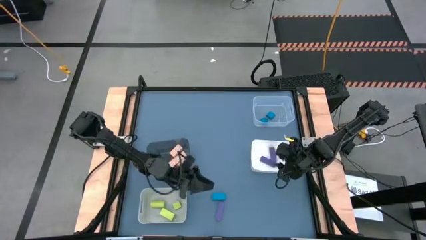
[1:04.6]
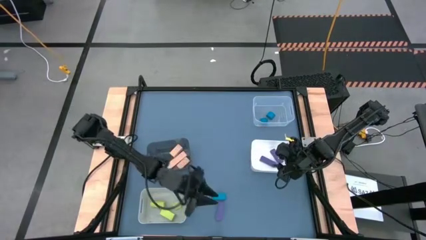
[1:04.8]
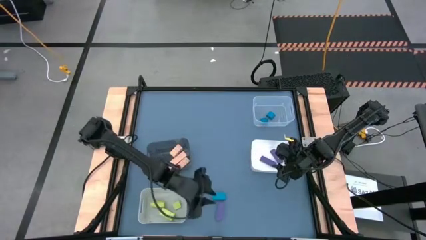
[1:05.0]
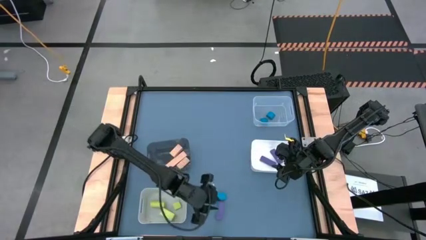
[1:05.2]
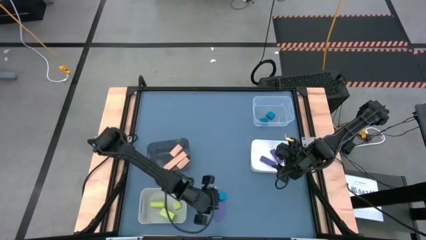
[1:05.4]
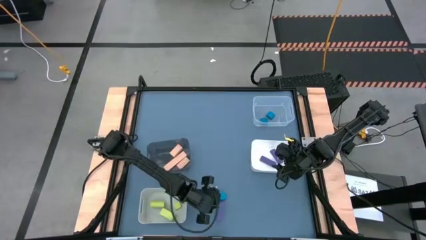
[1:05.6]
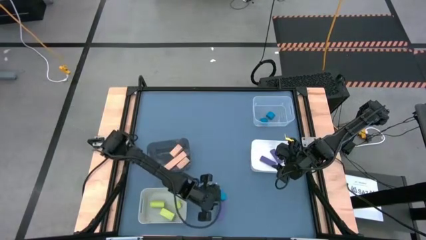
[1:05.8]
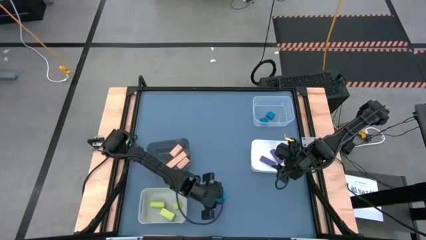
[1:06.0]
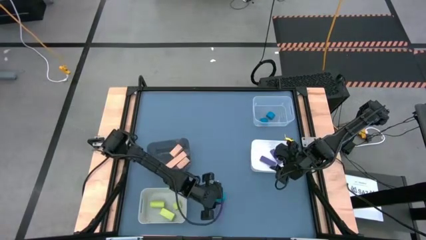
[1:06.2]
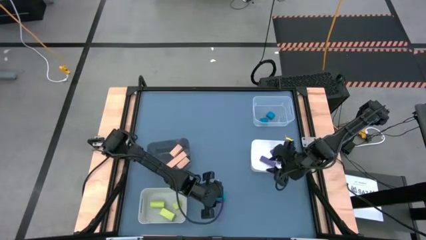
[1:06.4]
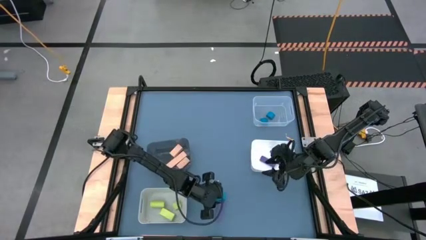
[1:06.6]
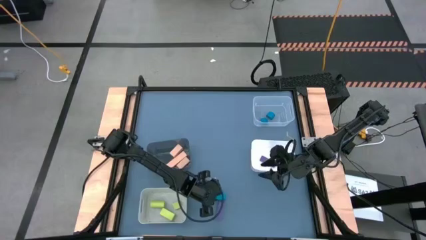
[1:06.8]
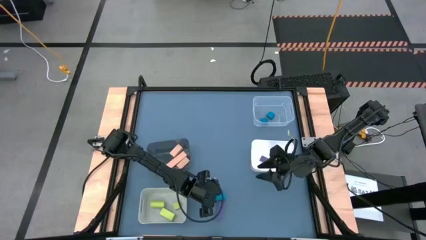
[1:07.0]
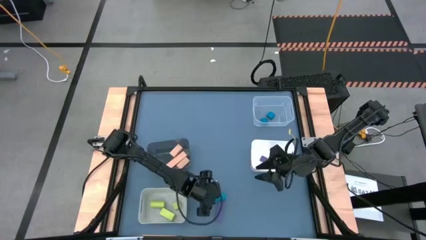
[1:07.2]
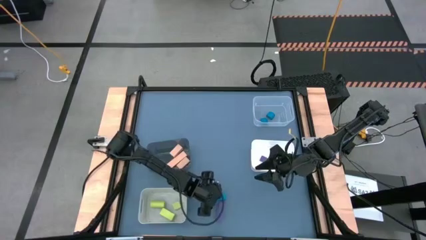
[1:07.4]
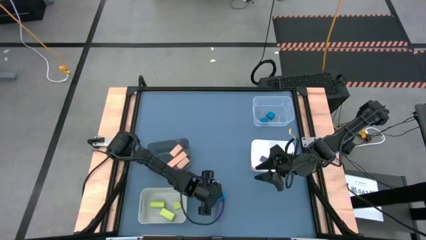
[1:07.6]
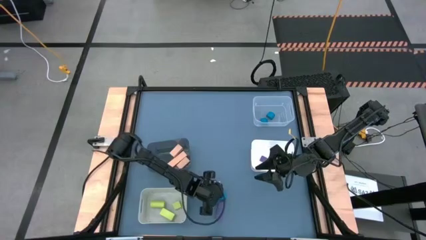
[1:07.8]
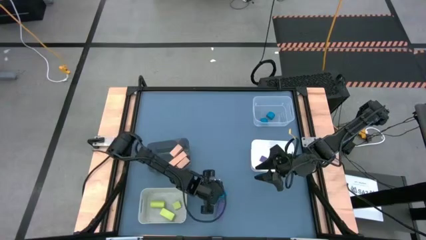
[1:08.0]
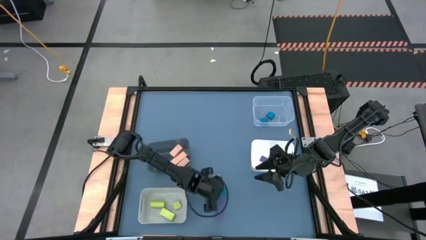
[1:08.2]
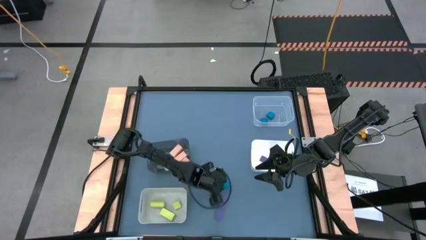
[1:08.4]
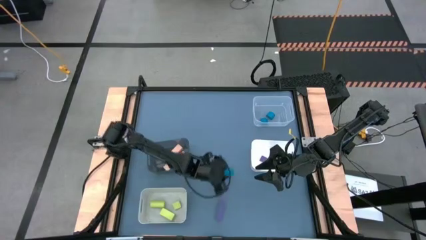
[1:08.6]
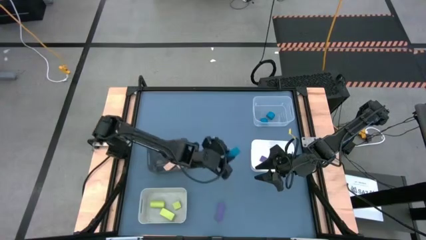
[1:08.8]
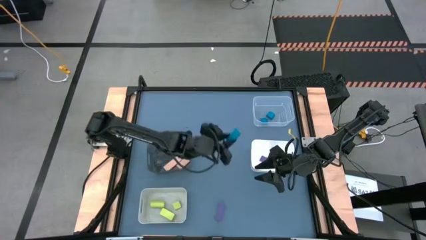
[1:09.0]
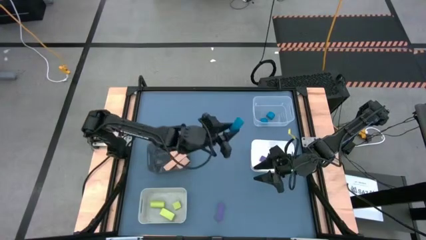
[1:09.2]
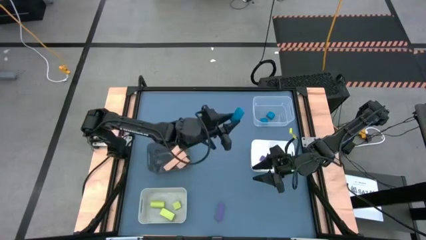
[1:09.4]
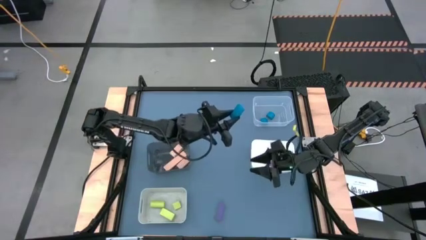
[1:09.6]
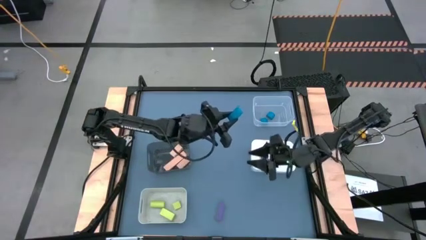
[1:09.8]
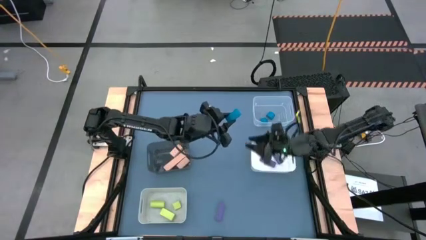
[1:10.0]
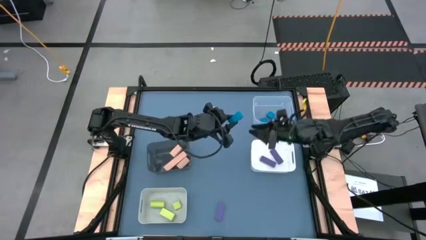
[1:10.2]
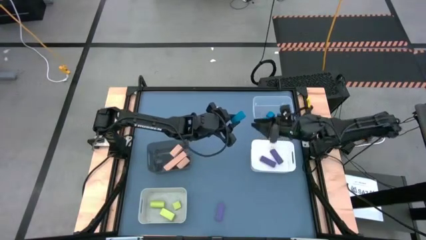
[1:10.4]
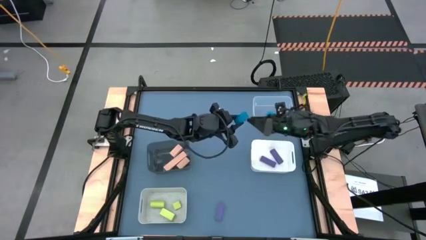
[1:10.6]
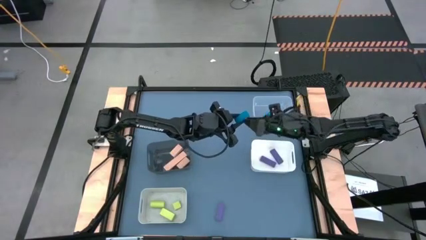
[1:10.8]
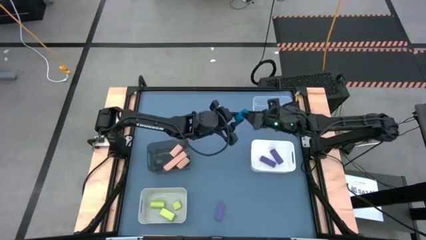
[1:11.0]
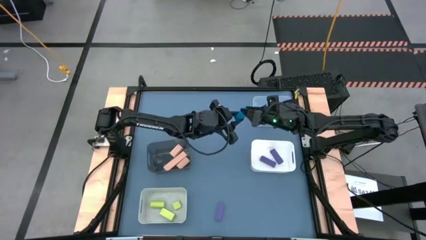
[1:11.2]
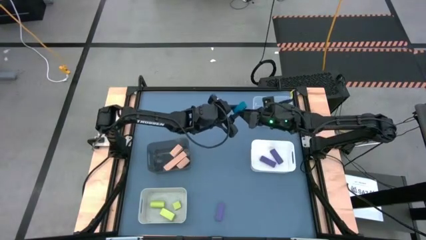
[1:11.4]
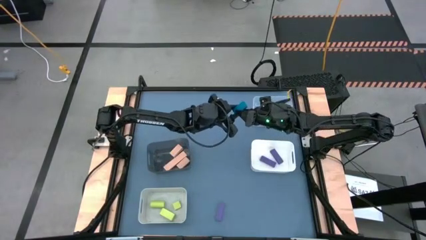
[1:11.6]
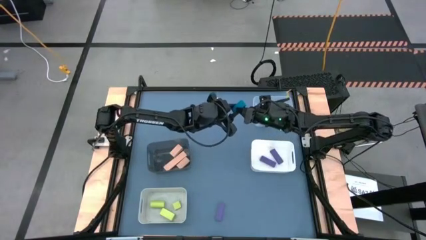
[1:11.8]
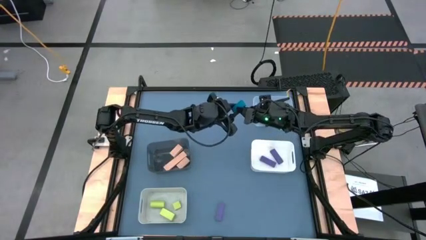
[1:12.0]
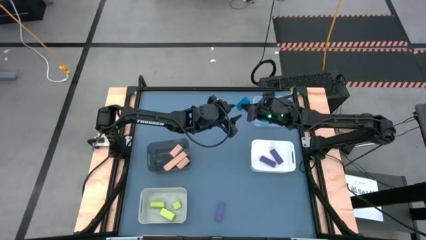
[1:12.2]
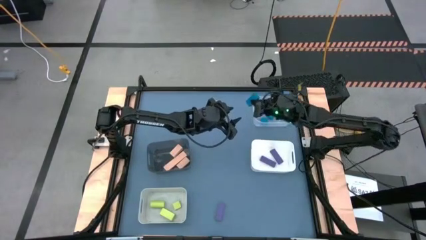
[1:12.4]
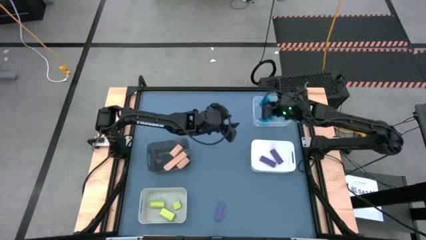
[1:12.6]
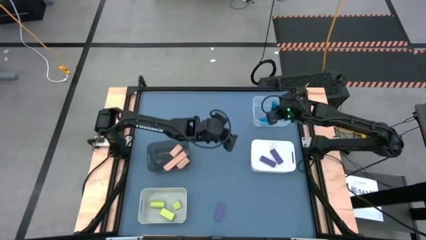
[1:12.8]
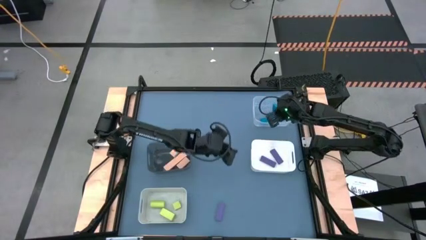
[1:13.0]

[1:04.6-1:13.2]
Task: Sort & place blocks by color
Put the blue block into the transparent bin

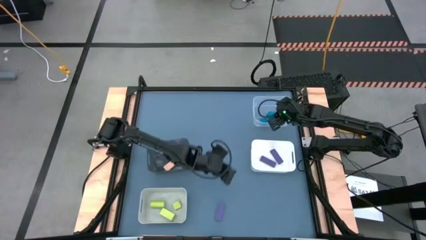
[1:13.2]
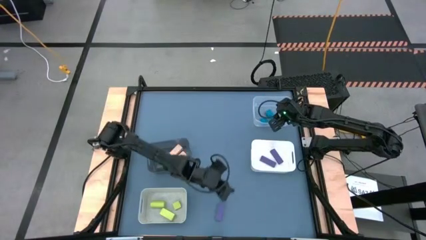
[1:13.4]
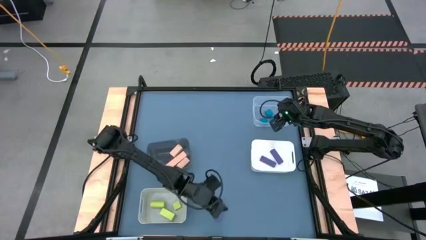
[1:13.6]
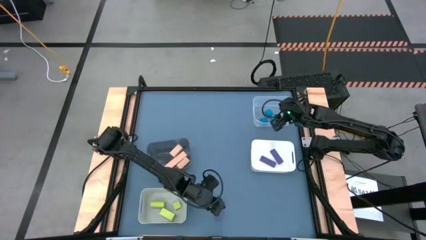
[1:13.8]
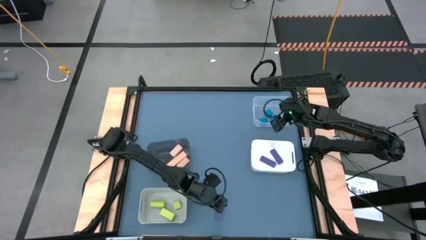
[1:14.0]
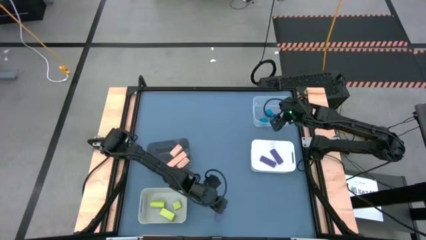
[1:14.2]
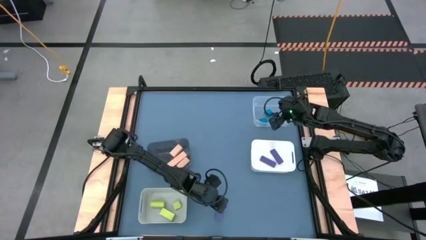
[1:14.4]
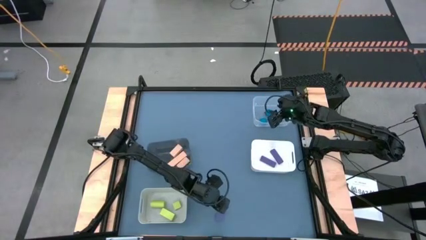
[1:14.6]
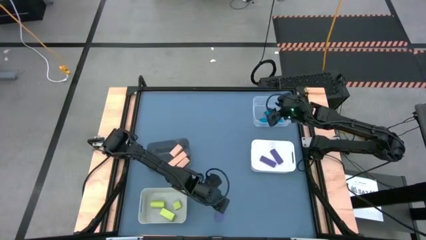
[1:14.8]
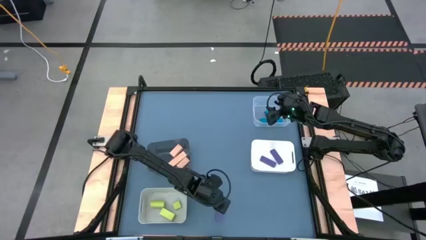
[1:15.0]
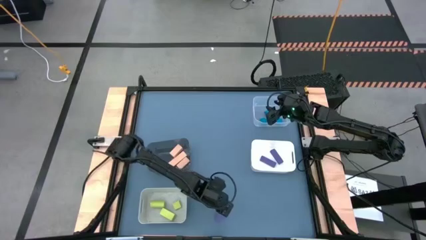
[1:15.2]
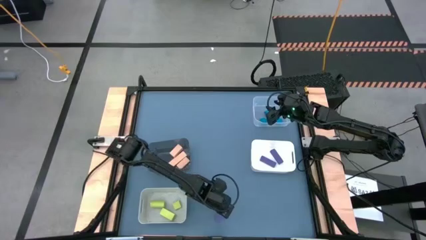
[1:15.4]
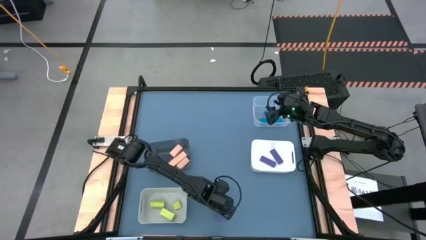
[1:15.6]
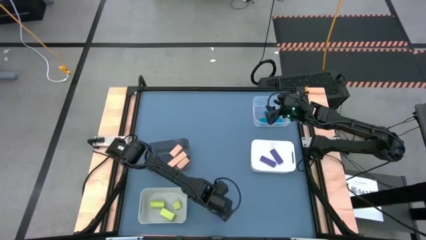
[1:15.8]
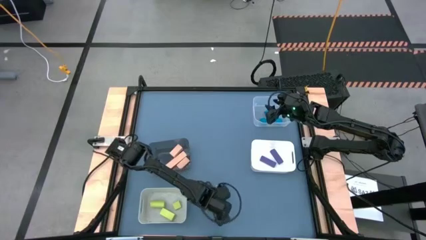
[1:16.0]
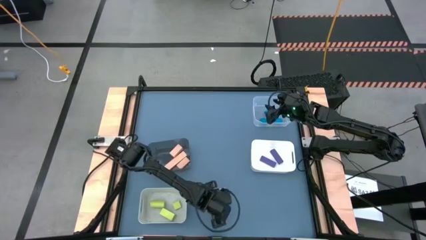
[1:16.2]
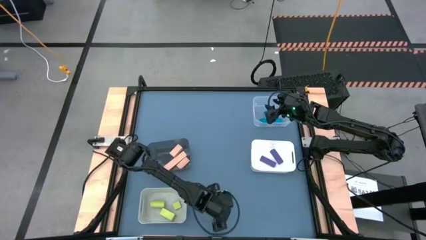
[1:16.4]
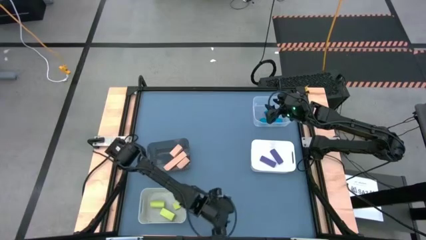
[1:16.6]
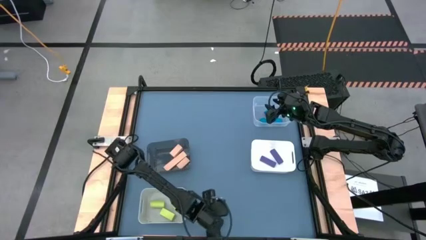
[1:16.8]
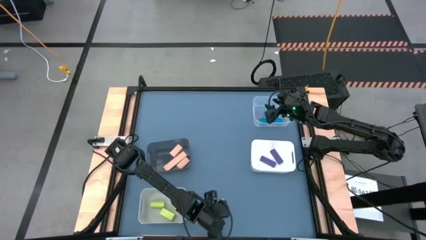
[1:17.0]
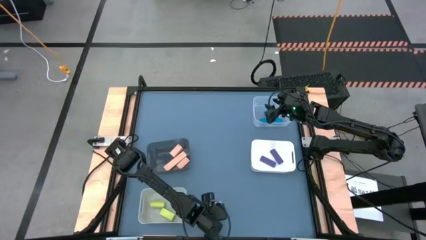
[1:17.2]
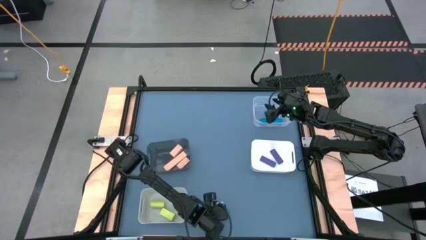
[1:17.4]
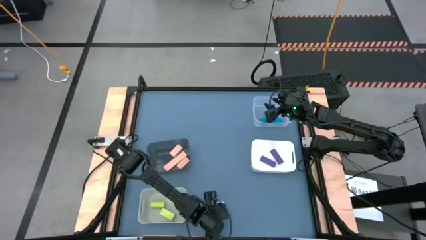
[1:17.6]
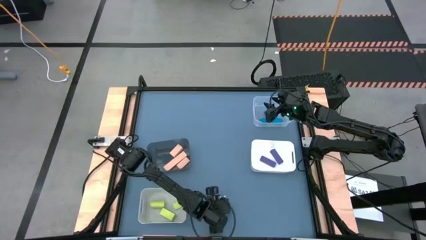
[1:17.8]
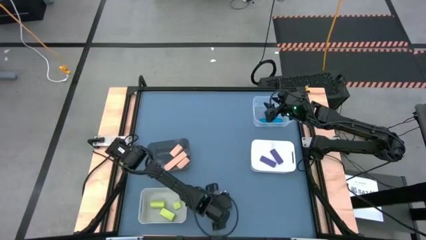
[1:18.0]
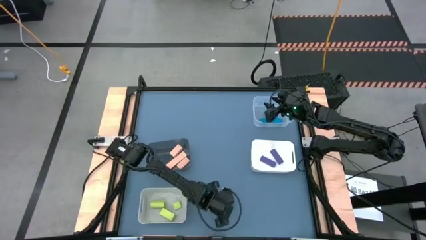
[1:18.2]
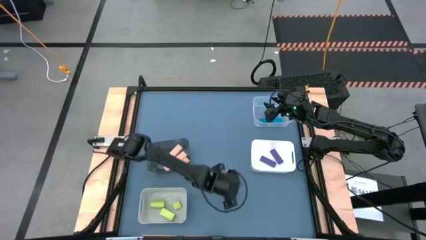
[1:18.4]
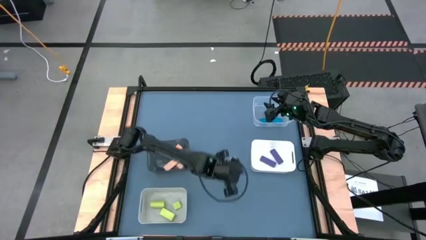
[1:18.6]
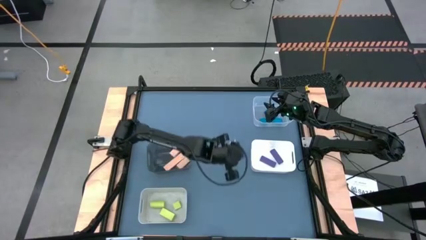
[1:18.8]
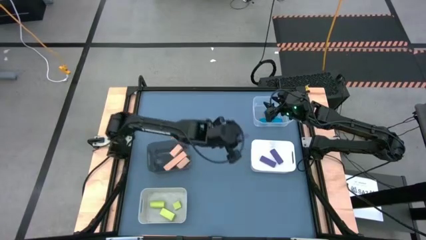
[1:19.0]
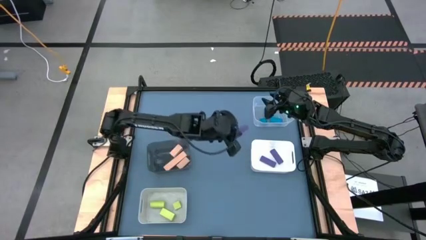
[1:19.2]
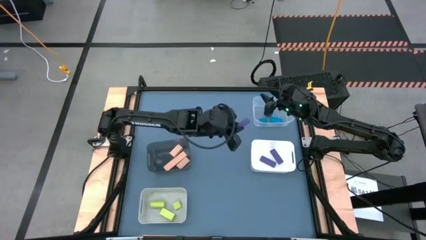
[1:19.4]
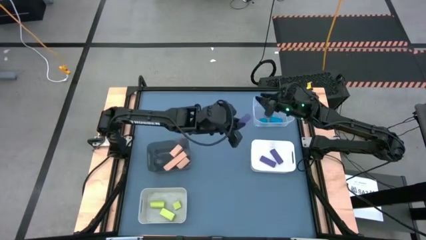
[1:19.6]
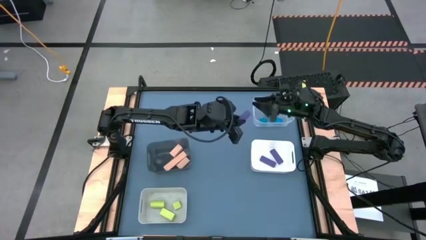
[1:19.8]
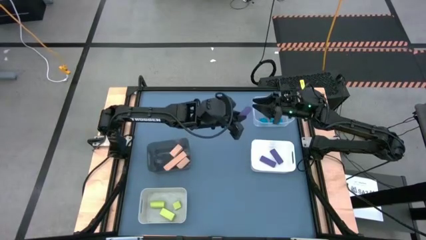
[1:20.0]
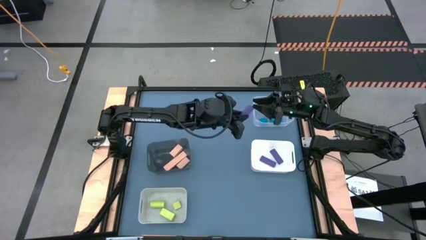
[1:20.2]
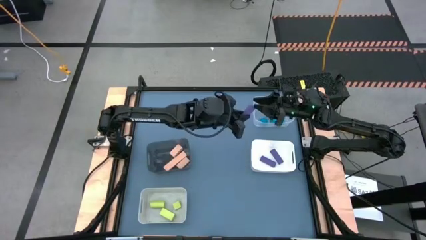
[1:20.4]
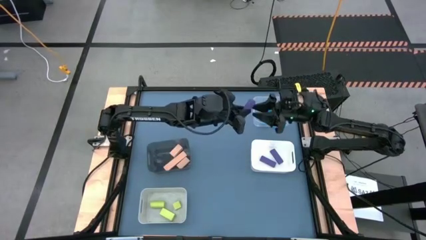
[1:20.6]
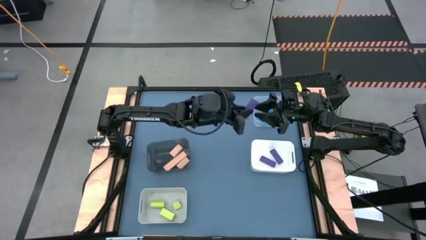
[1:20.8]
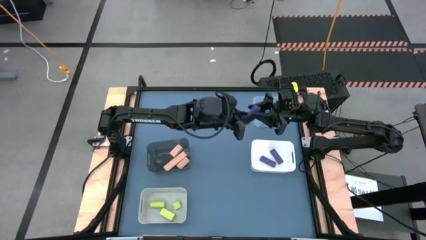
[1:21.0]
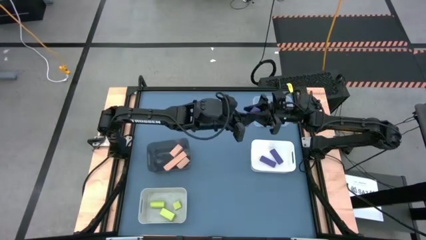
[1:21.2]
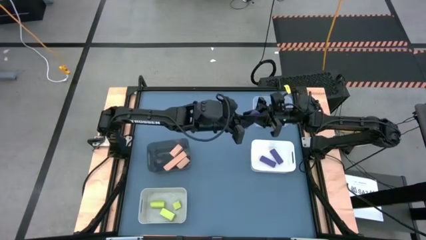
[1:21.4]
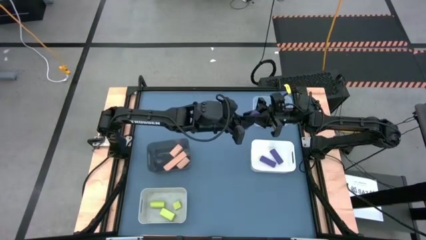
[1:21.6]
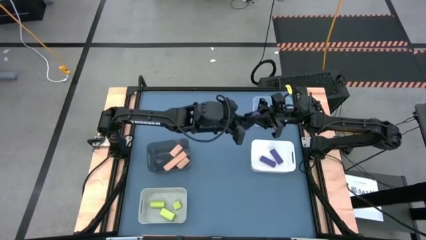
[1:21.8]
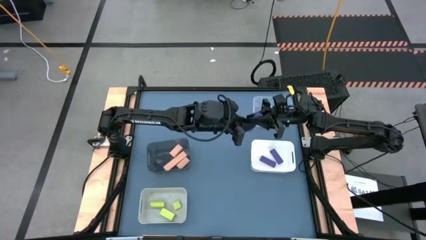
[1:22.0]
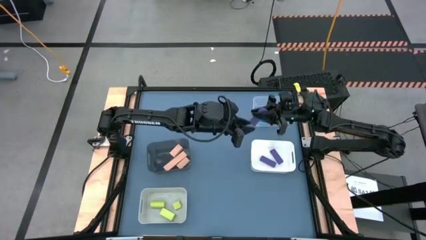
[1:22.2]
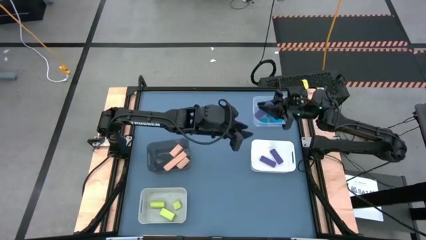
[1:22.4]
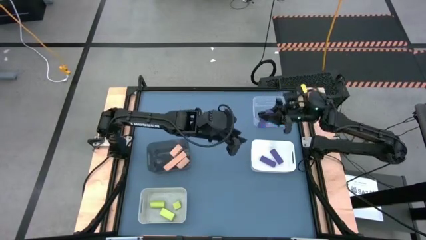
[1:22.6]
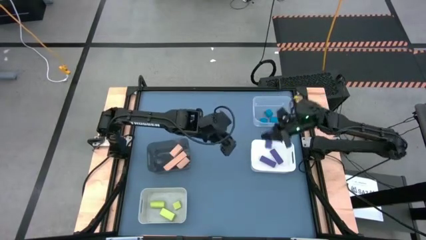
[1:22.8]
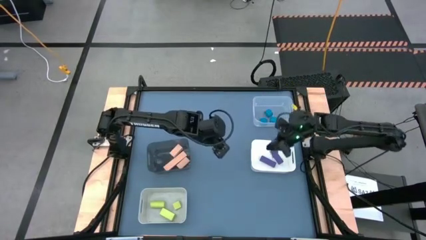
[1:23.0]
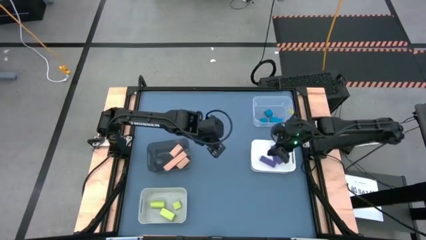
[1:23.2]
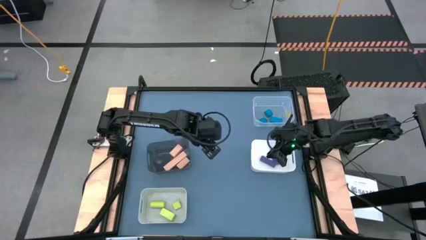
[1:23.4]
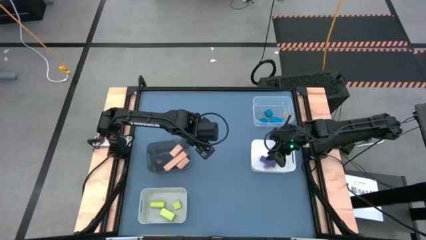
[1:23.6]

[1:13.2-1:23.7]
Put the purple block into the white bin
